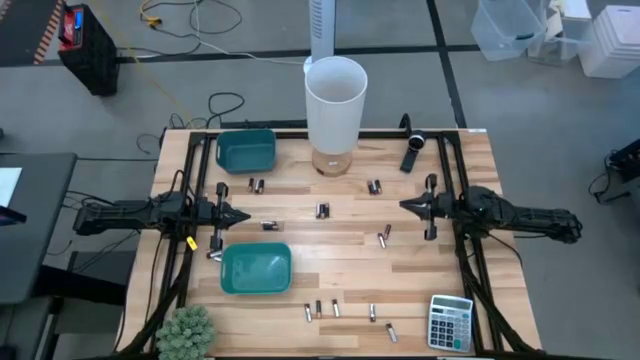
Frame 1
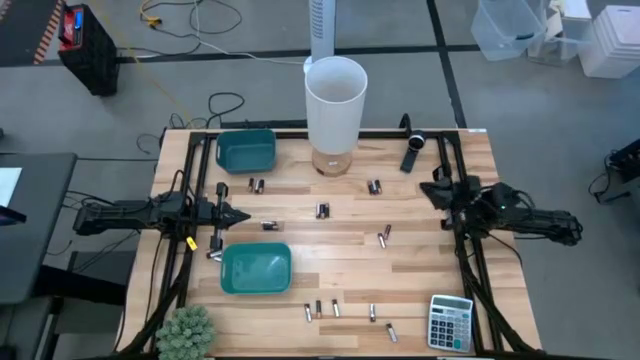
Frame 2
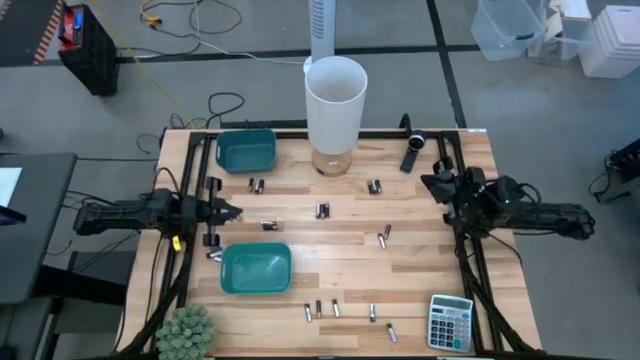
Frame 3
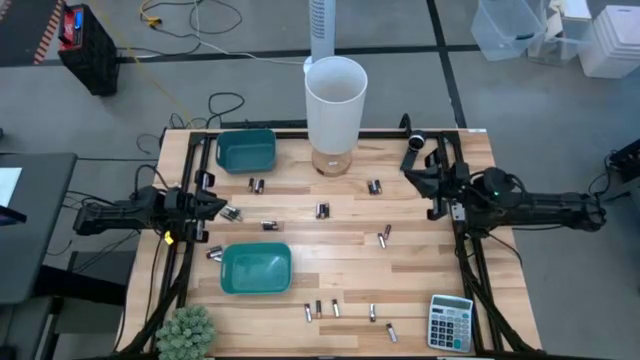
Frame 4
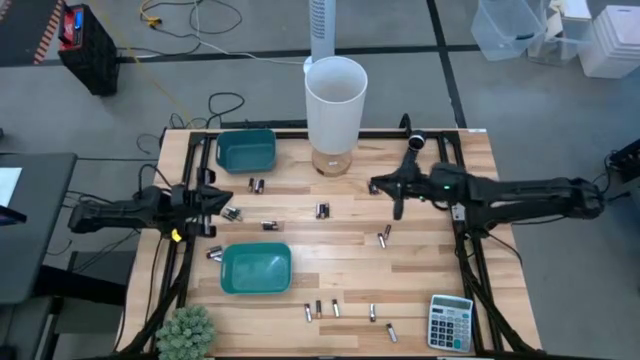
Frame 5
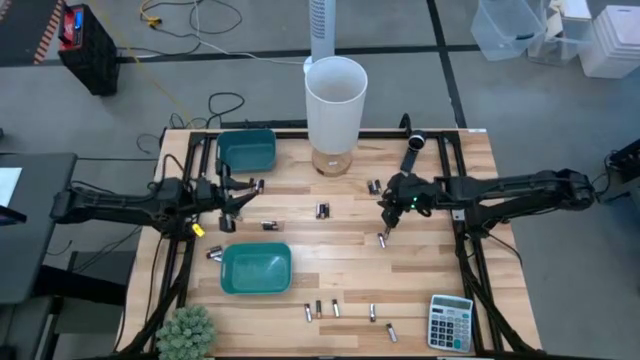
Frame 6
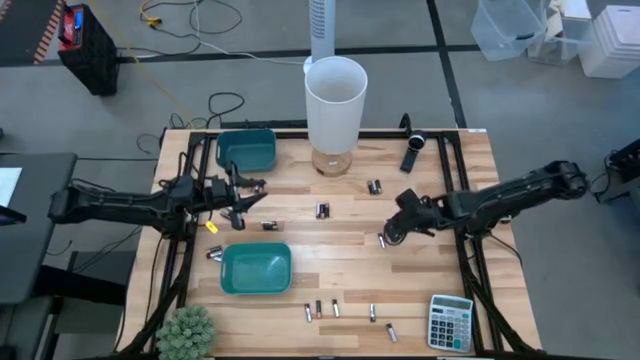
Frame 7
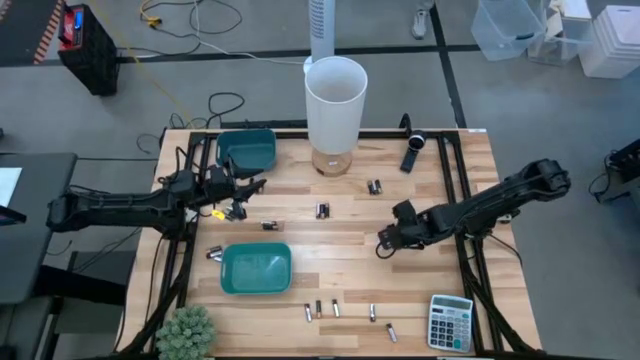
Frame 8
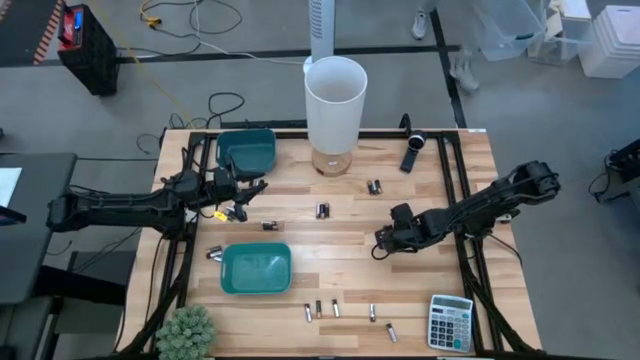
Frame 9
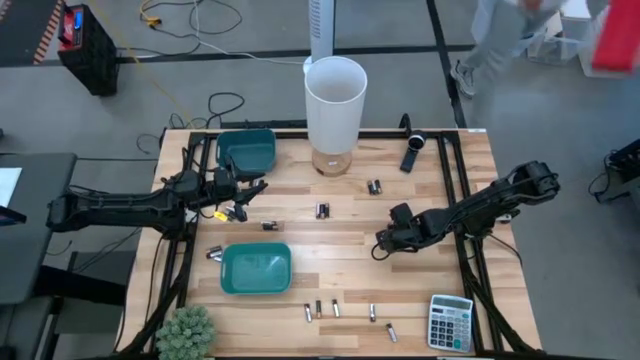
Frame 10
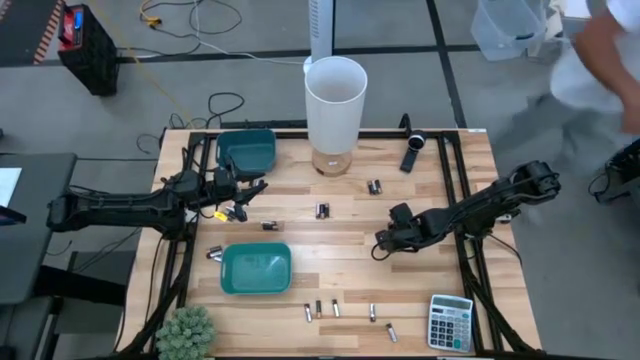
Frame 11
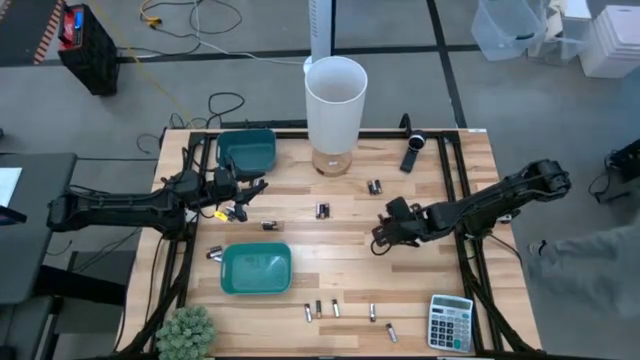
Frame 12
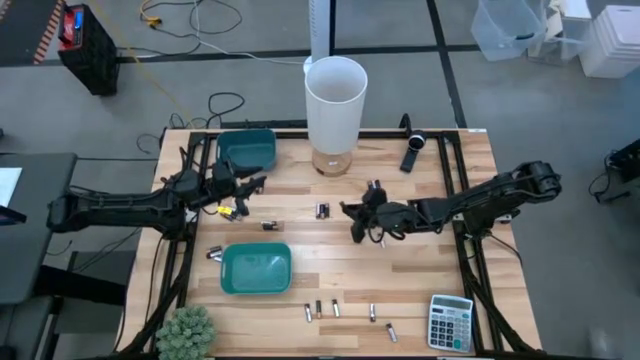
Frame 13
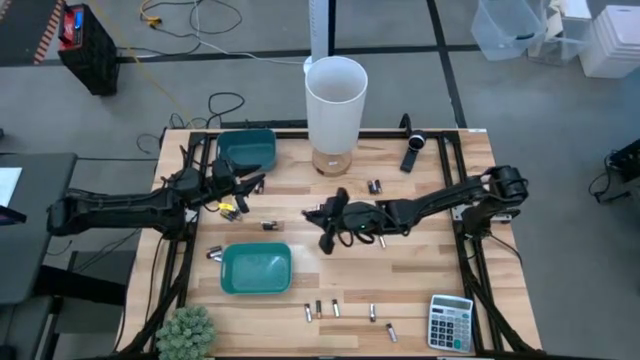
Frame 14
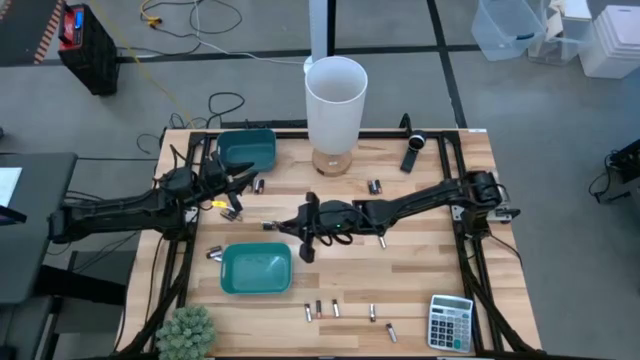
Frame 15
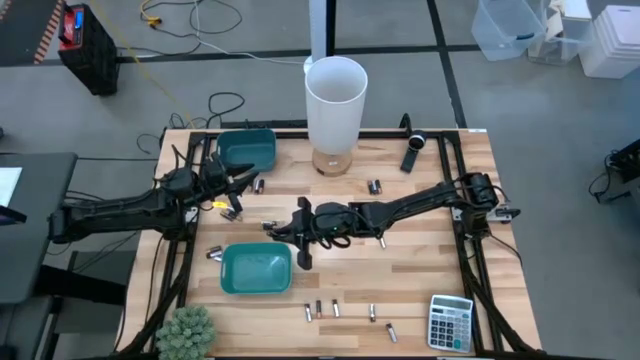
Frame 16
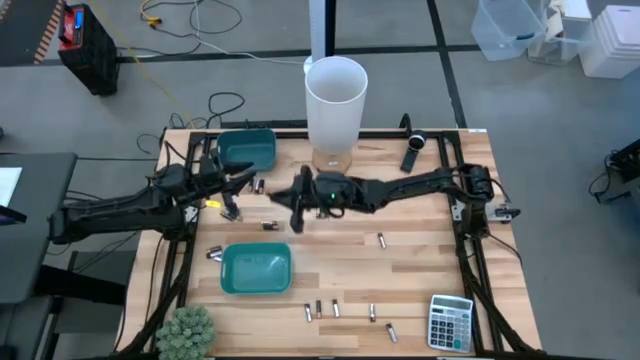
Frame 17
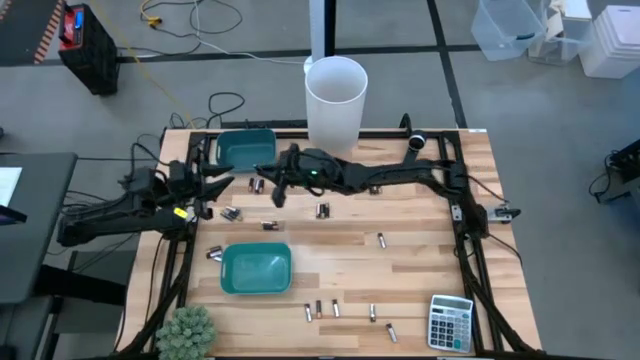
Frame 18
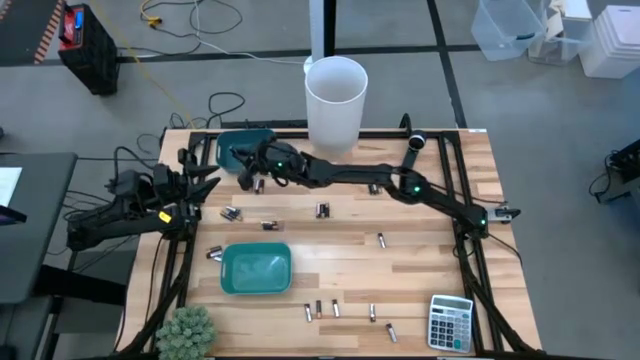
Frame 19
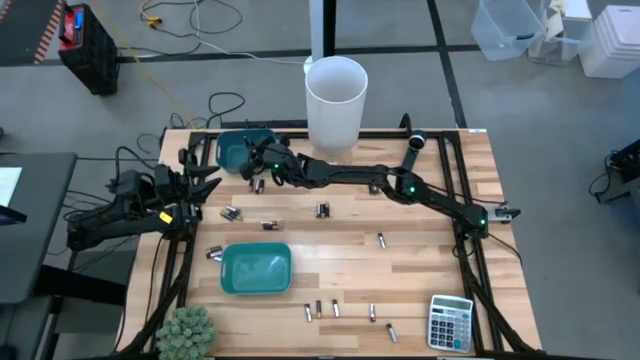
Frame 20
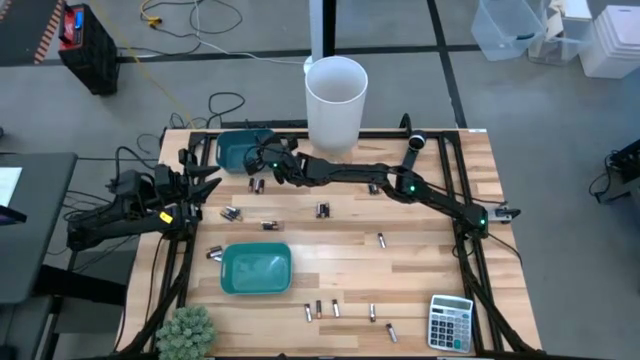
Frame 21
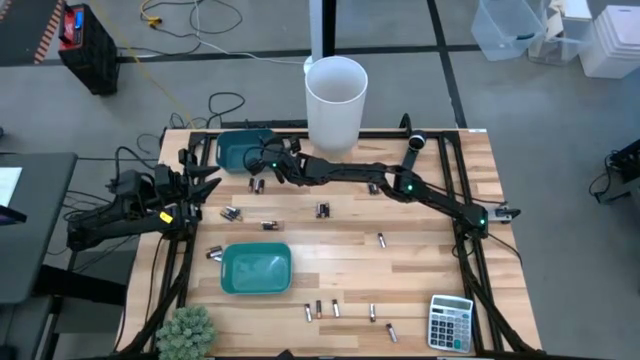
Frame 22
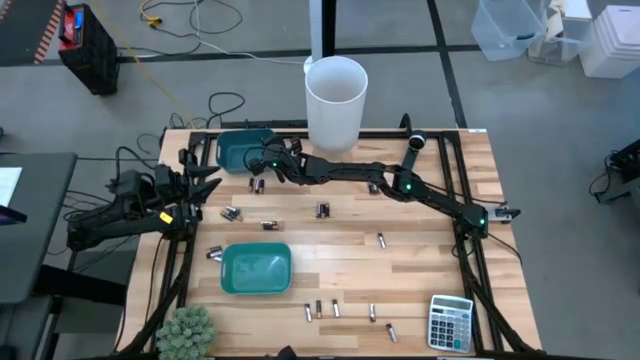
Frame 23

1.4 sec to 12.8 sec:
Task: Sort batteries
Put the black battery into the blue bin

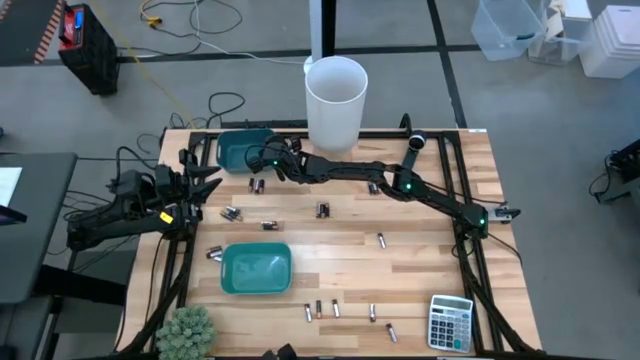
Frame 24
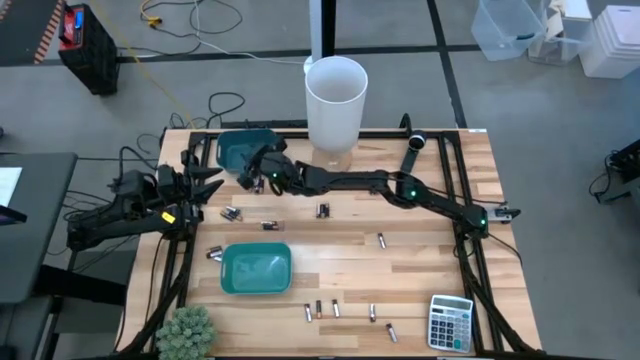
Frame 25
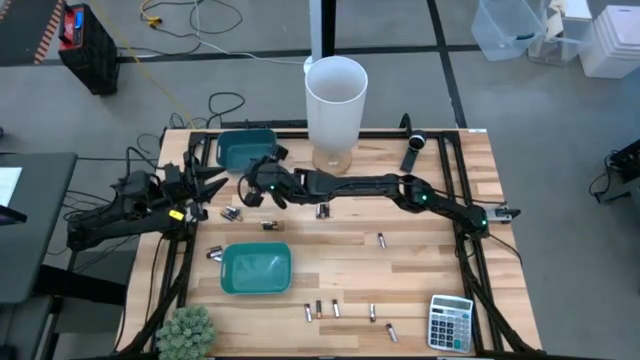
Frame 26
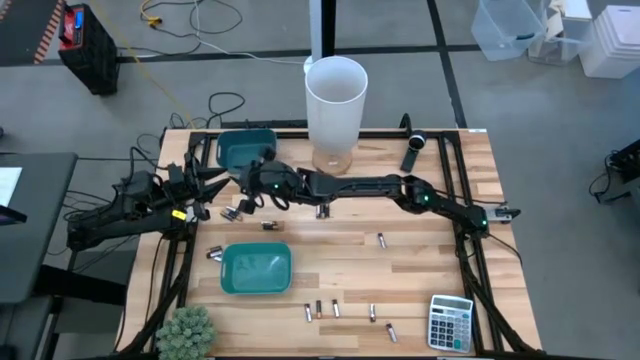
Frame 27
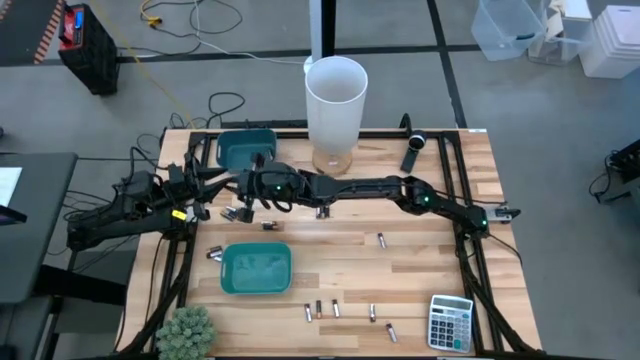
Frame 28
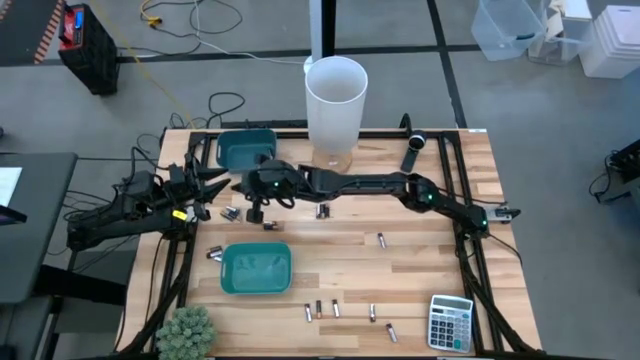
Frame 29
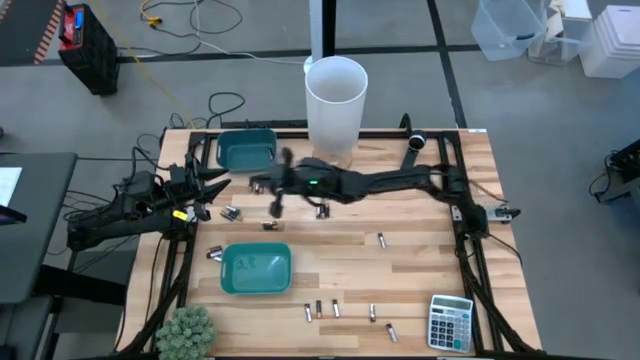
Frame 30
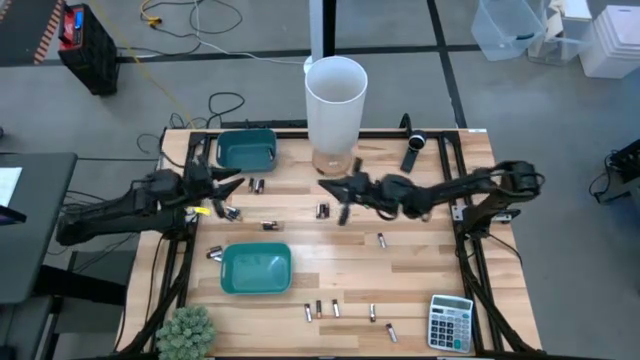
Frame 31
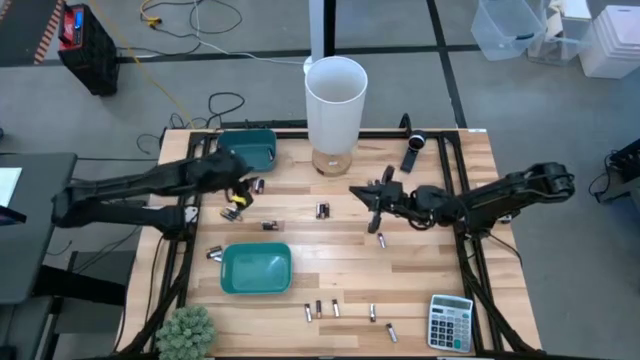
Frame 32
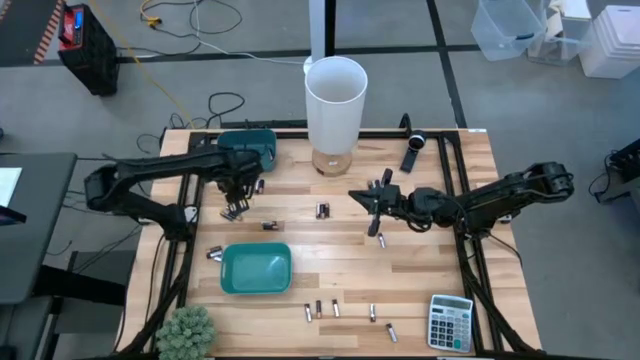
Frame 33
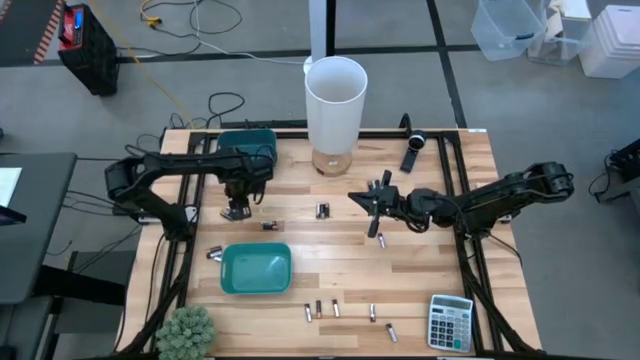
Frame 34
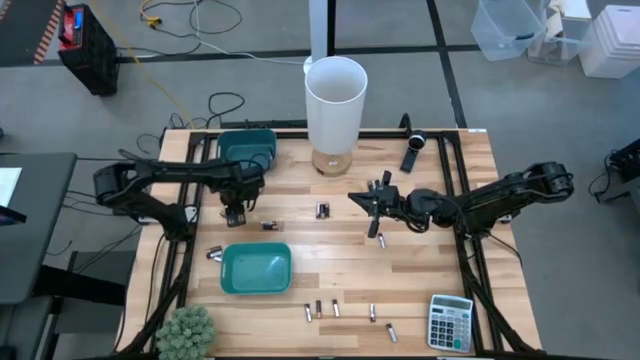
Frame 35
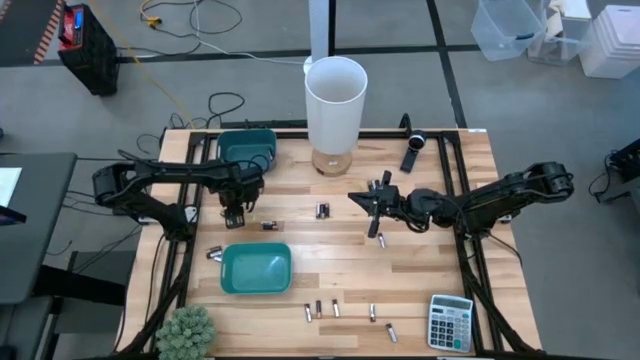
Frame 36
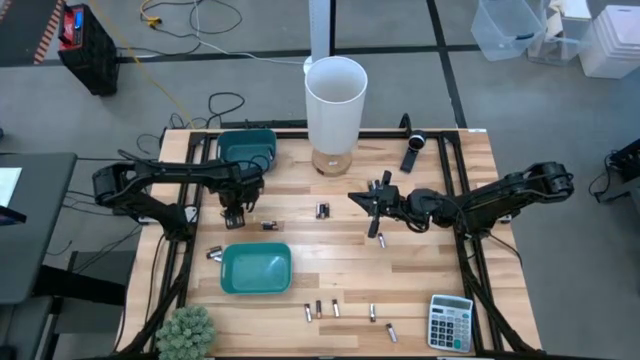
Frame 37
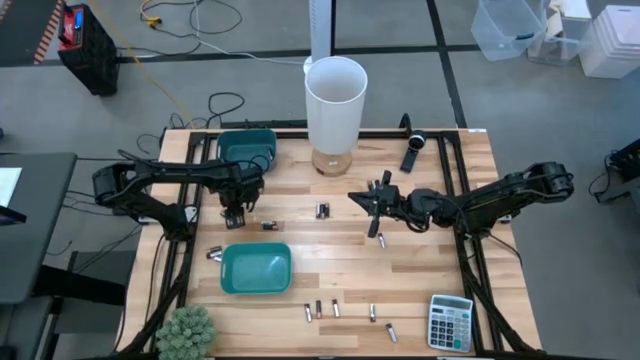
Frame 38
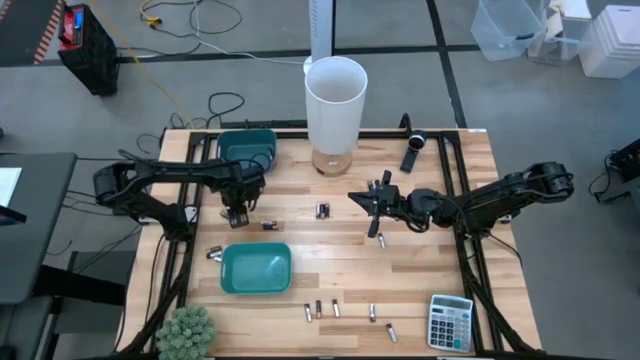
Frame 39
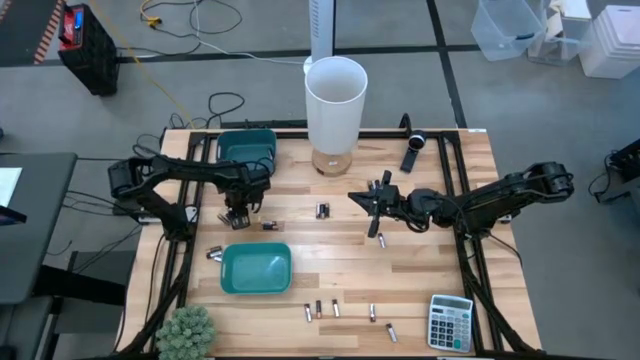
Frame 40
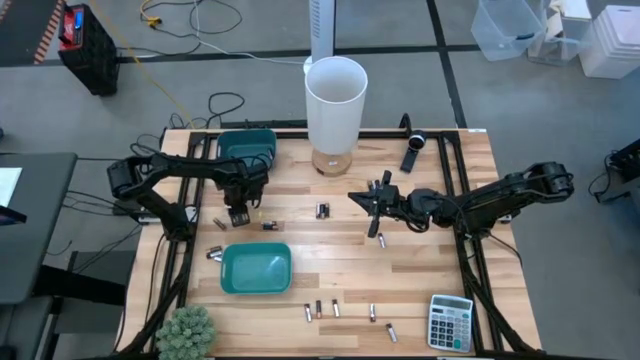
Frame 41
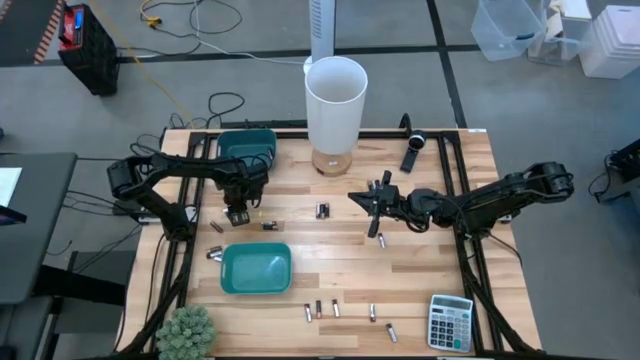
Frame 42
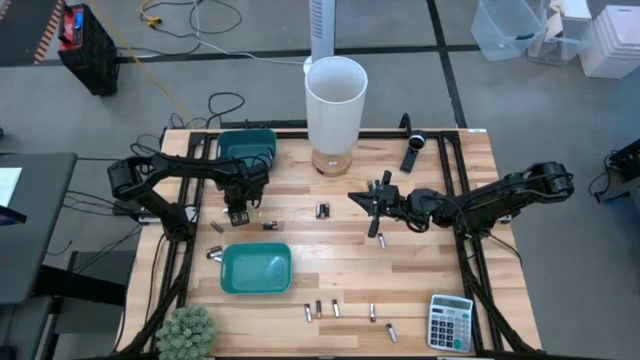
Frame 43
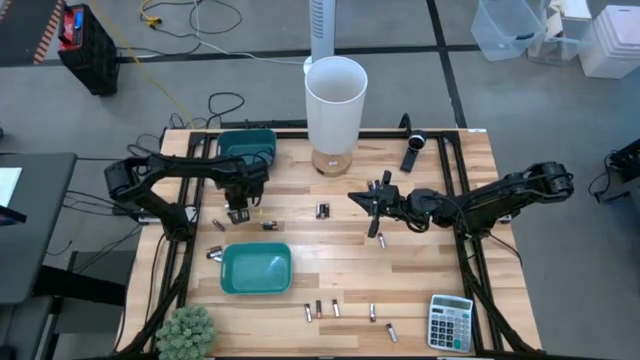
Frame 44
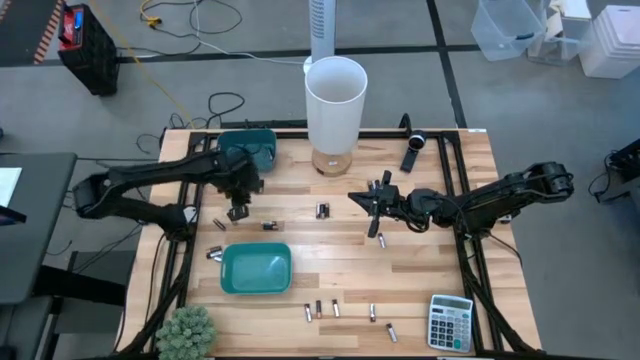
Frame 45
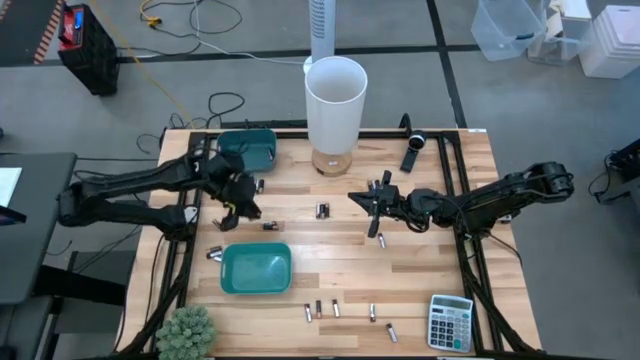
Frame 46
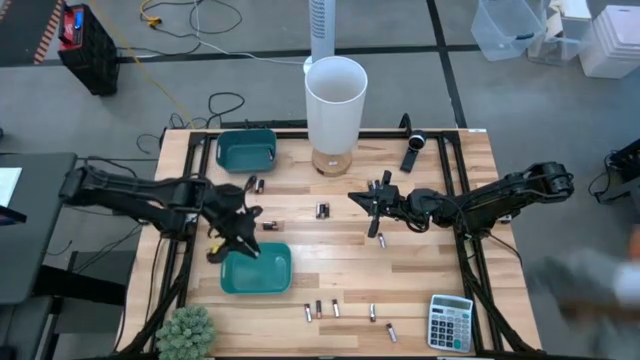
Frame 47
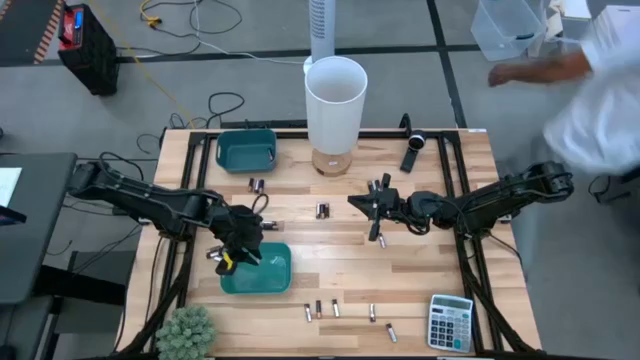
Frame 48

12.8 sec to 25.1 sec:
Put the silver battery into the green bin
